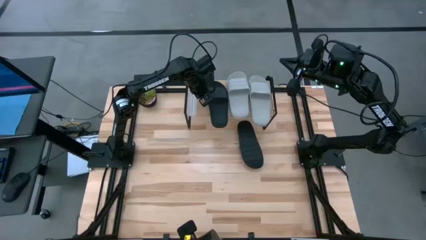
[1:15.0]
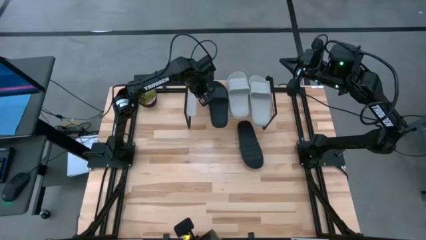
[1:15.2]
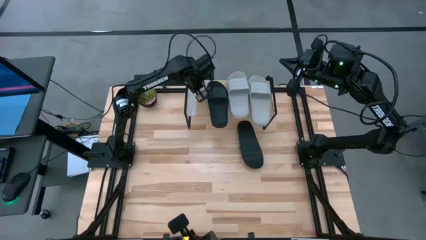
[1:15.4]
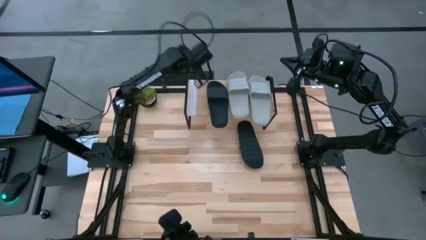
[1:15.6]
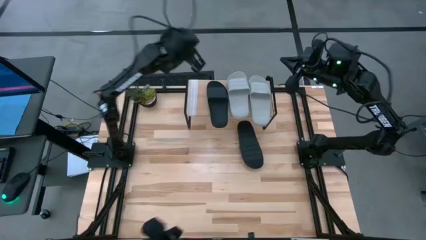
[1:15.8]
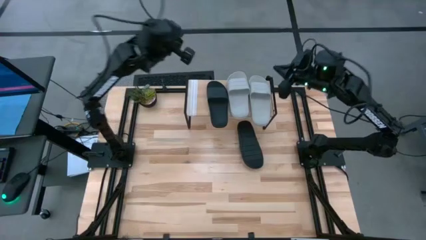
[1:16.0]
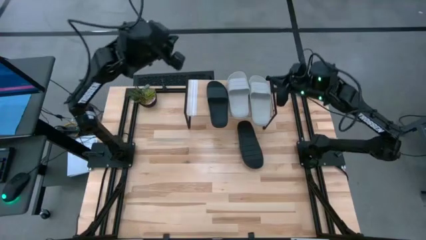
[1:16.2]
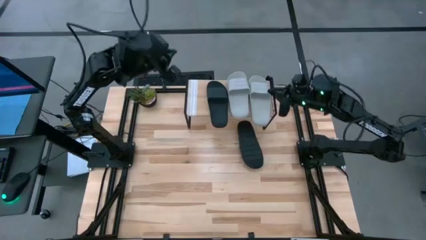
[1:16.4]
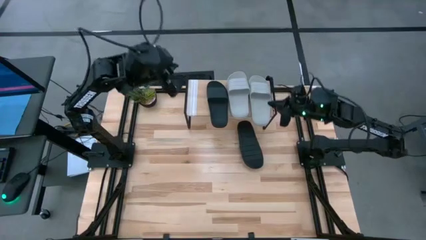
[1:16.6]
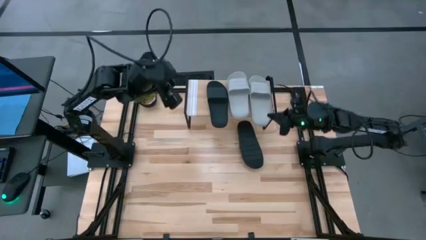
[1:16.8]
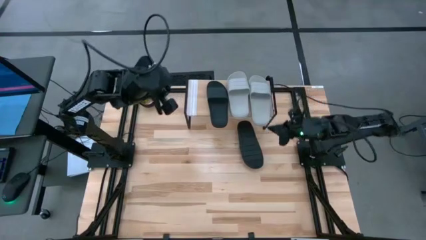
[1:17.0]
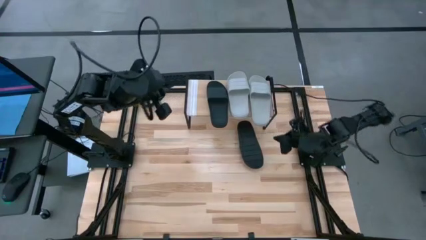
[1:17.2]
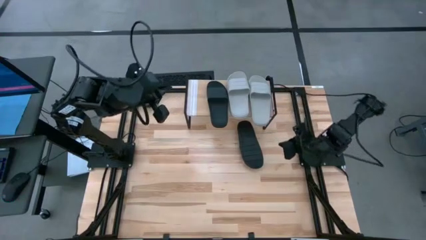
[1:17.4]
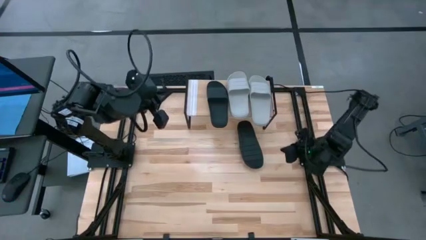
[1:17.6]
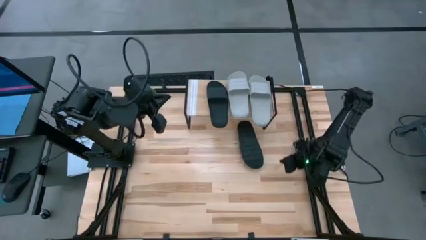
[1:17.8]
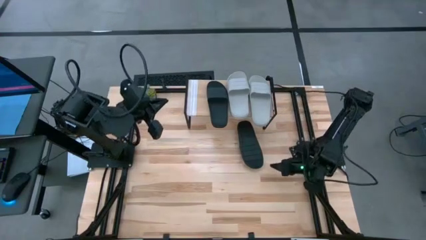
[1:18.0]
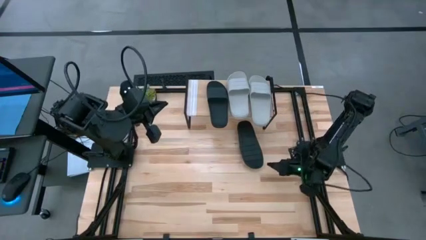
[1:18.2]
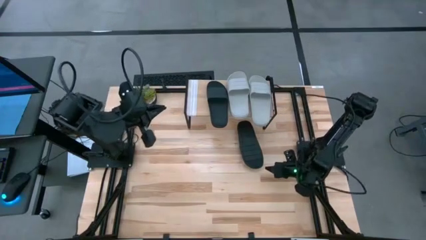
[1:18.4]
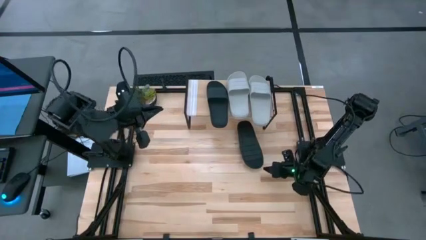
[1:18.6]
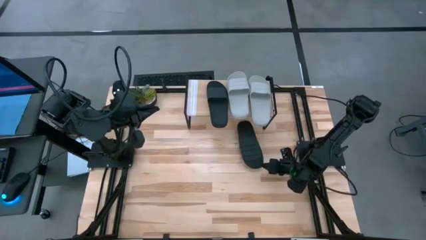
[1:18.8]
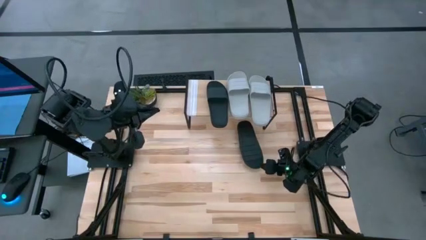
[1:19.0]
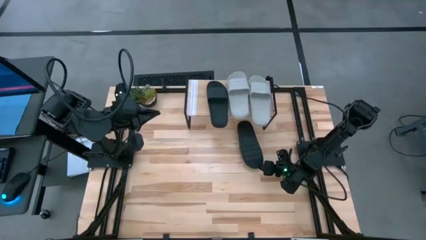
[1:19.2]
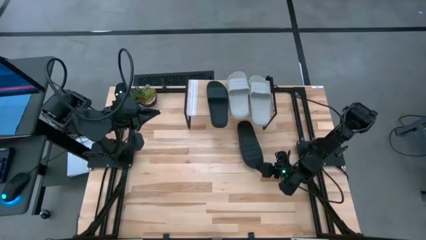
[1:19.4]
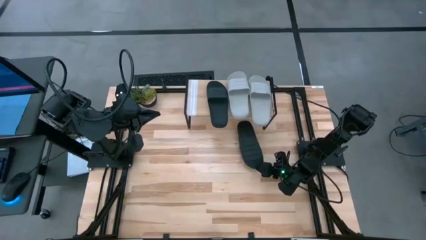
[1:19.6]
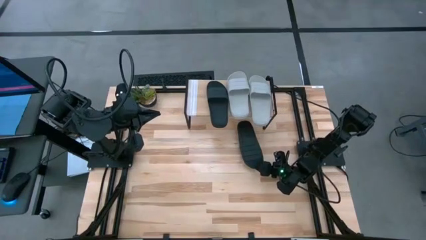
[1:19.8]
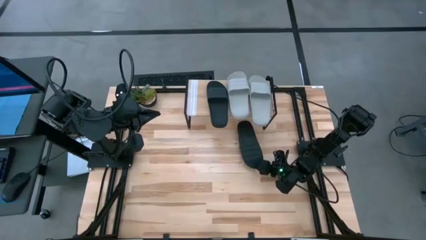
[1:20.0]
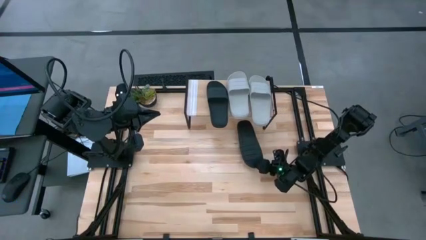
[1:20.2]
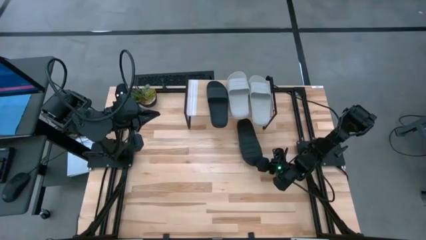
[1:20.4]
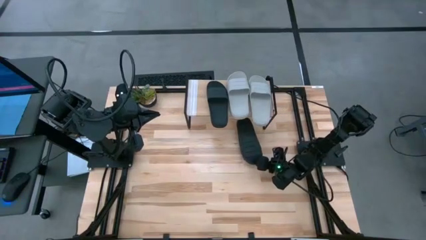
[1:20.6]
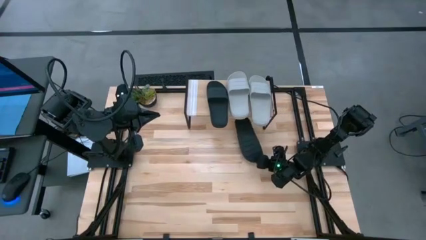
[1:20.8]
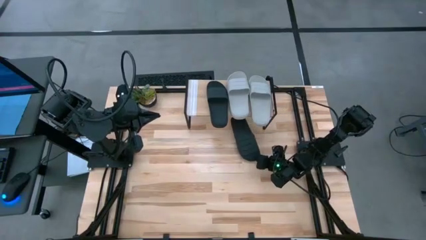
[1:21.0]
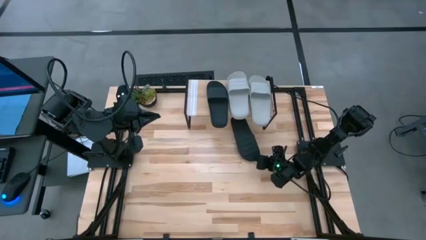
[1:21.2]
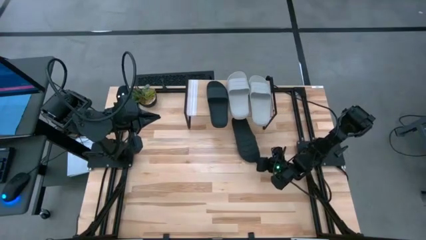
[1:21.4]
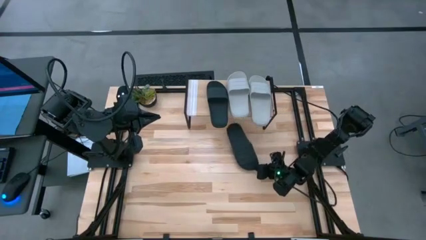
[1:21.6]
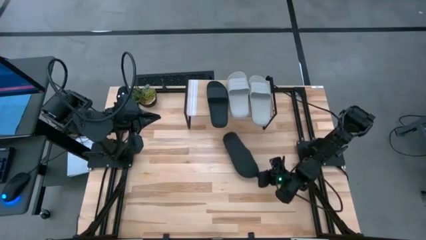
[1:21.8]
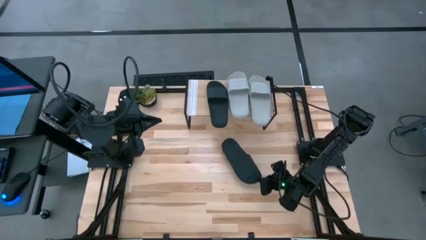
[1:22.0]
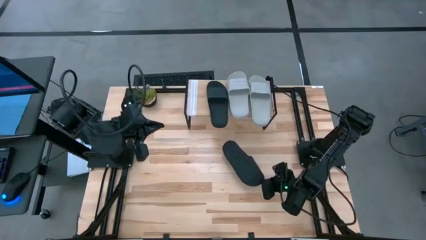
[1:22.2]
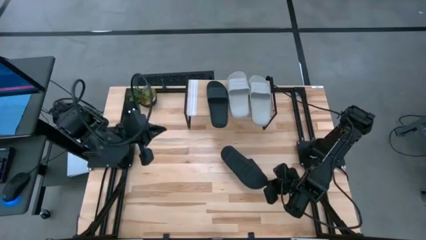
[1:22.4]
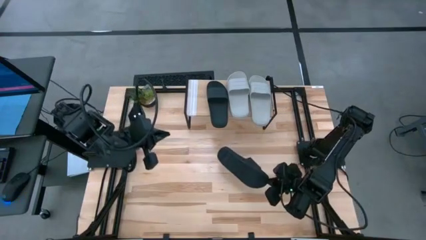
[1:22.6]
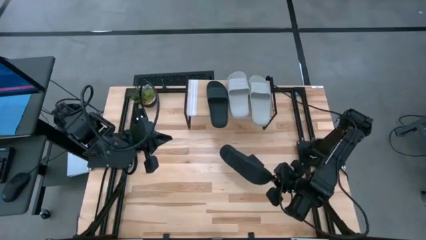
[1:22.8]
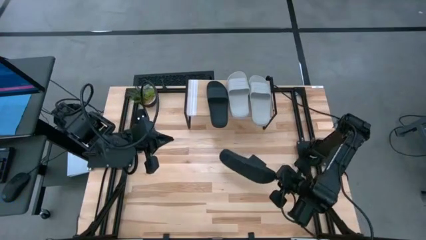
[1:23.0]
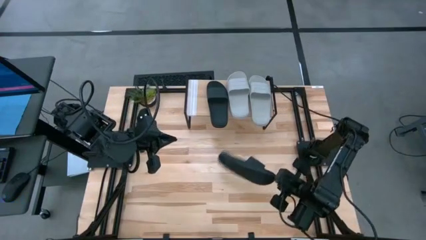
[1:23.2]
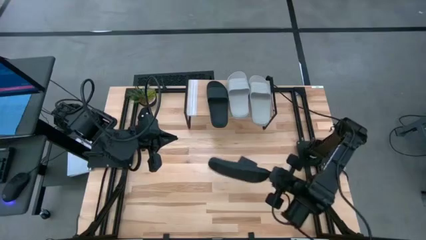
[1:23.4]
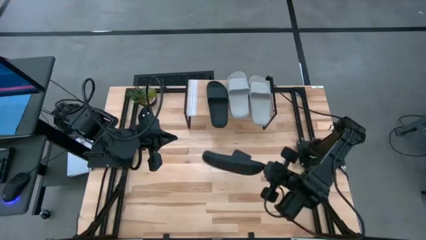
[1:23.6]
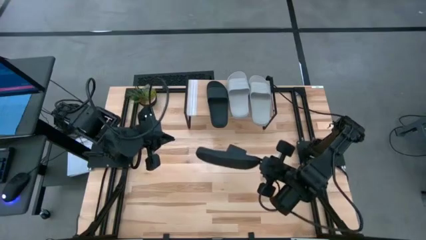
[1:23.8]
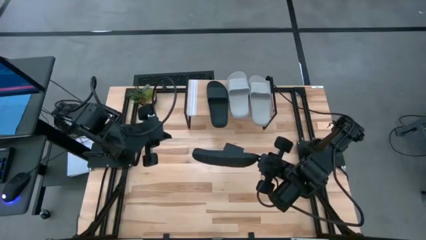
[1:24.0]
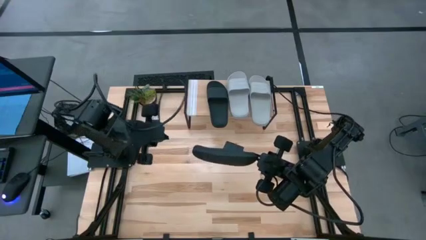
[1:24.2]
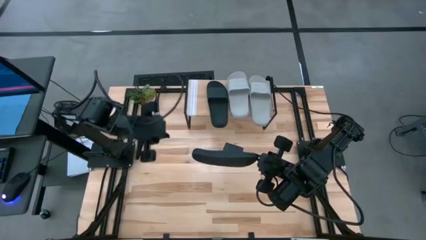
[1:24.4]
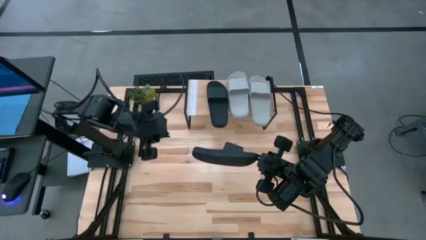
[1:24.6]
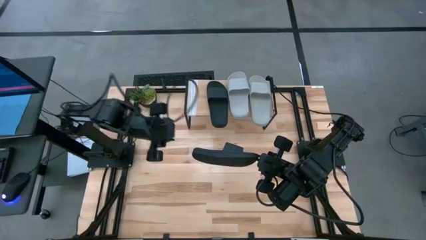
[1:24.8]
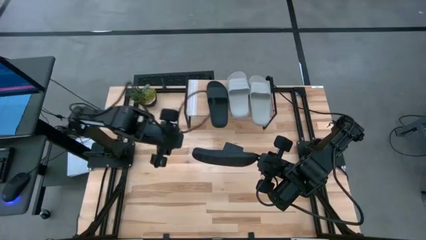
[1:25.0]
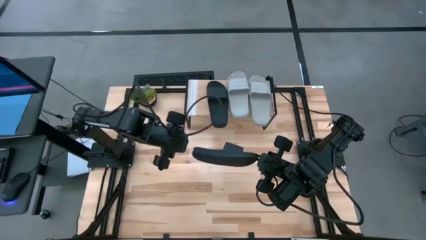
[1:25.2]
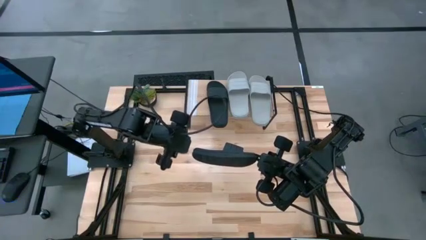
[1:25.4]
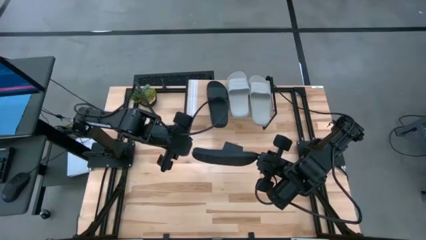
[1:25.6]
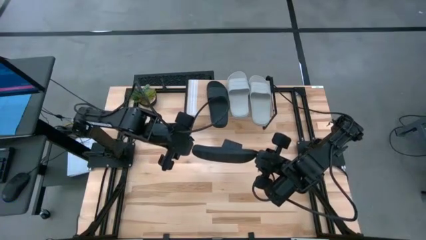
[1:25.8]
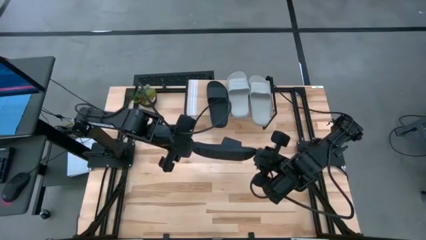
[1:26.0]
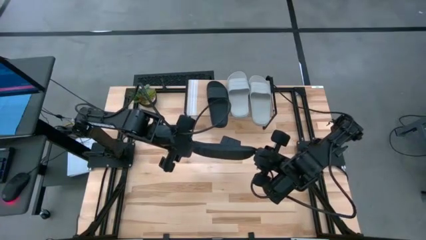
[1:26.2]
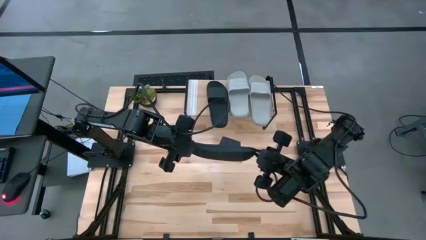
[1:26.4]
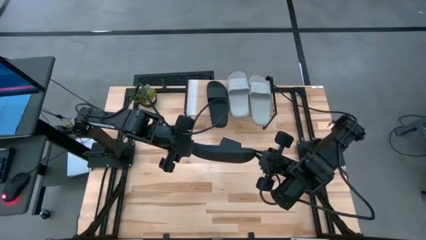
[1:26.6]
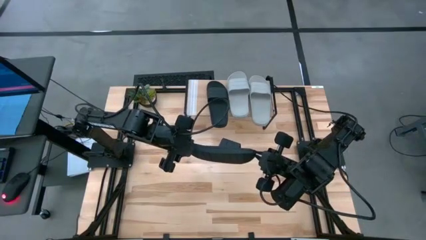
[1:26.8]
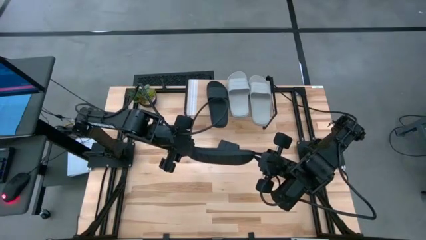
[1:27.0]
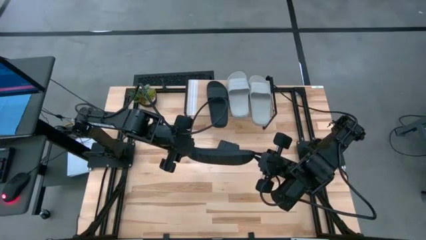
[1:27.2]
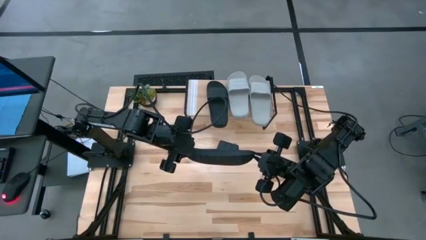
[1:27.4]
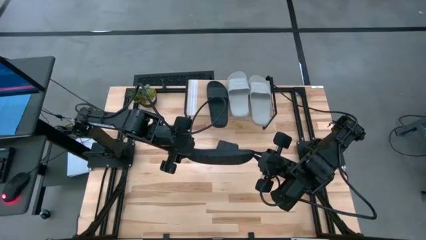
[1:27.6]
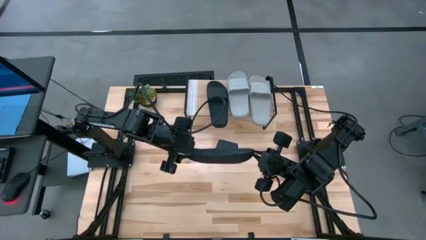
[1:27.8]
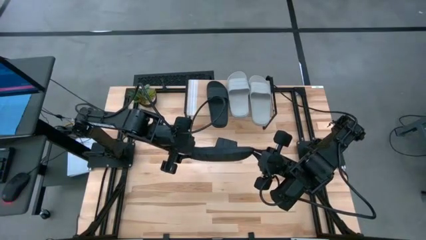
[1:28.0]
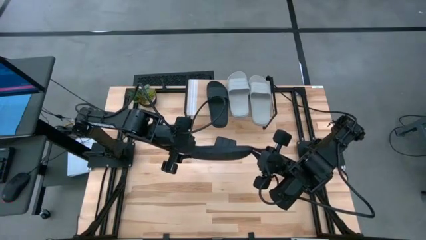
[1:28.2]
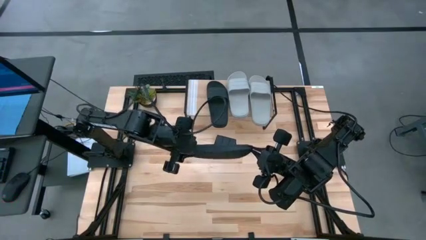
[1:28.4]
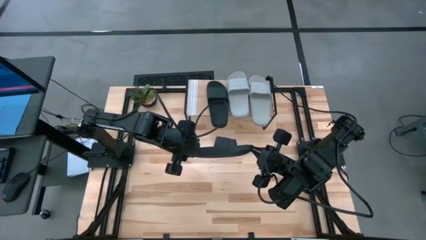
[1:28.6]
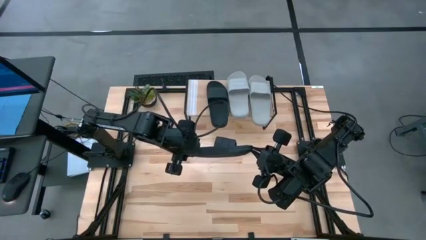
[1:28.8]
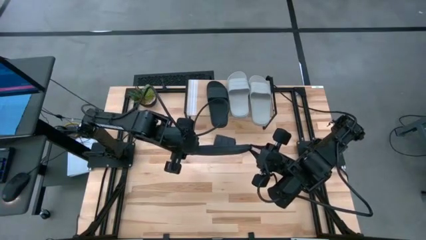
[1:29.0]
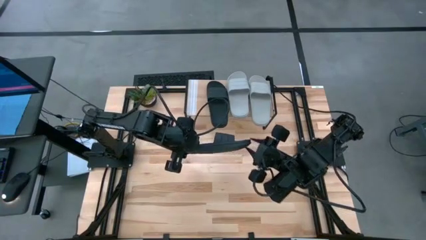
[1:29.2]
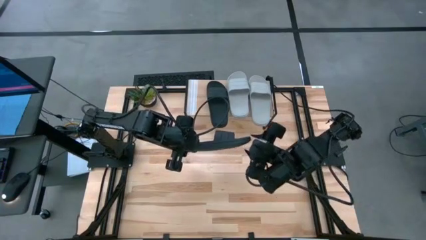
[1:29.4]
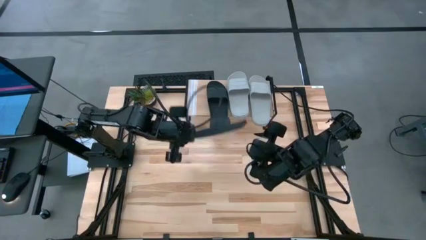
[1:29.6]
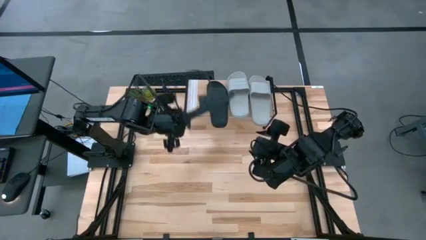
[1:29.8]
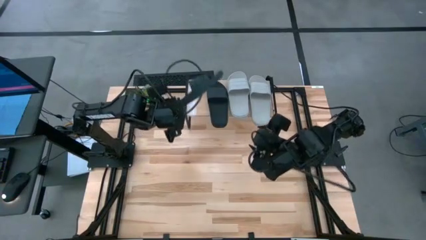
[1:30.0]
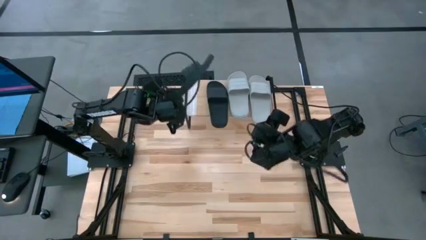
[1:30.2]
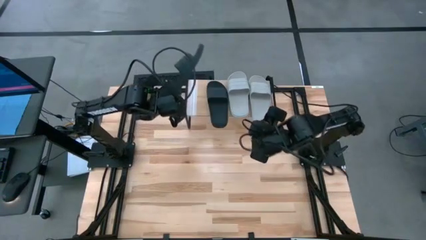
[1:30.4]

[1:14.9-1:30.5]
Task: Pick and place slides into the shelf
Put the black slide on the shelf
